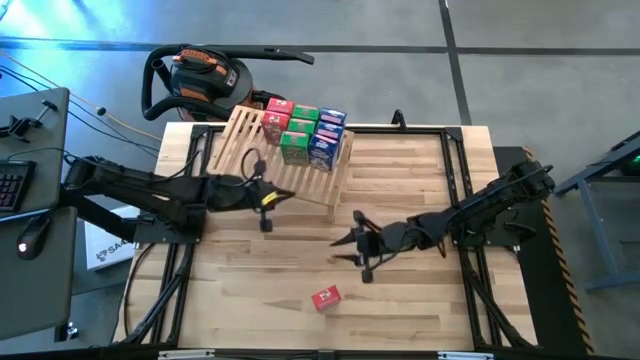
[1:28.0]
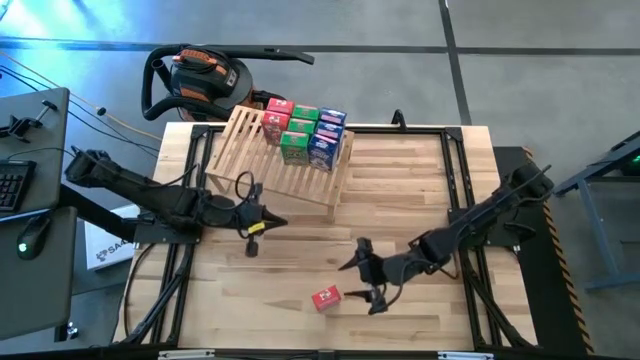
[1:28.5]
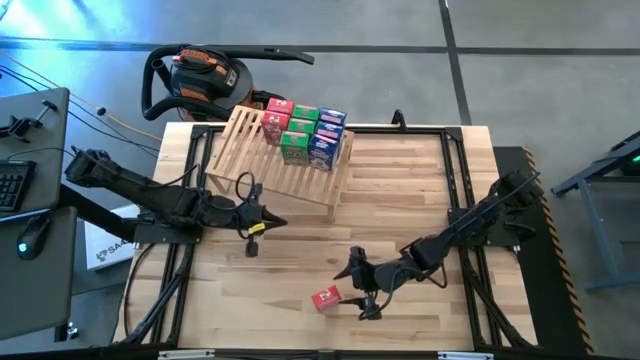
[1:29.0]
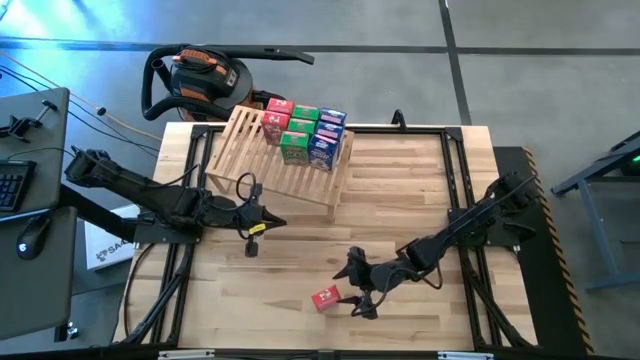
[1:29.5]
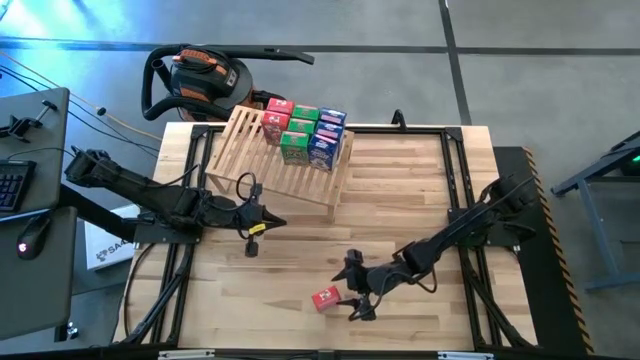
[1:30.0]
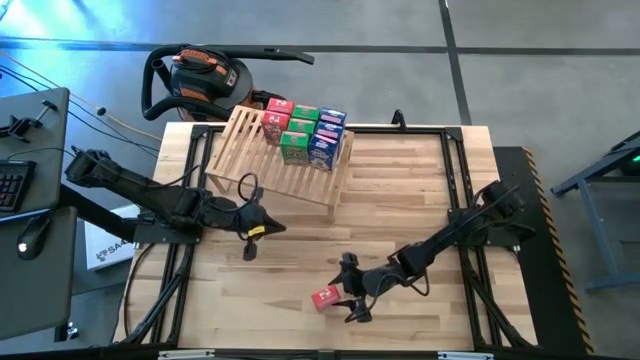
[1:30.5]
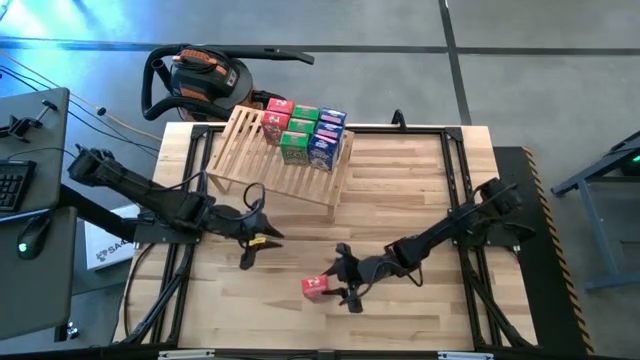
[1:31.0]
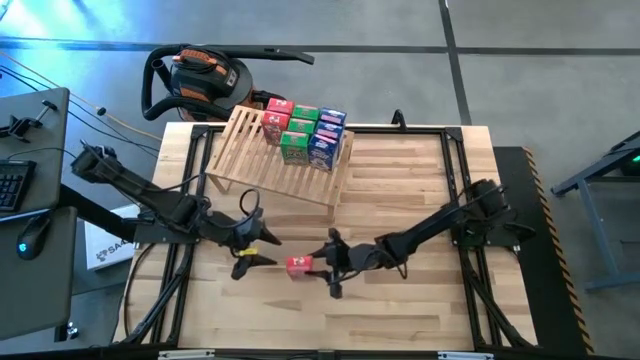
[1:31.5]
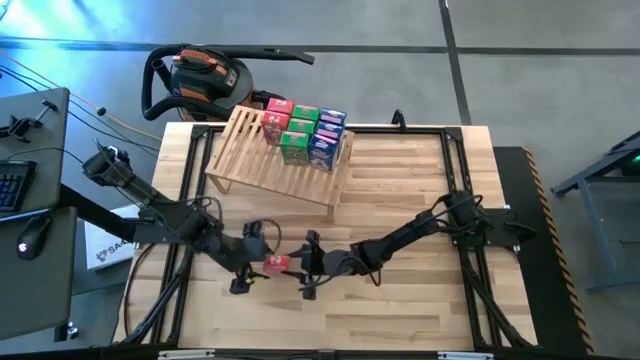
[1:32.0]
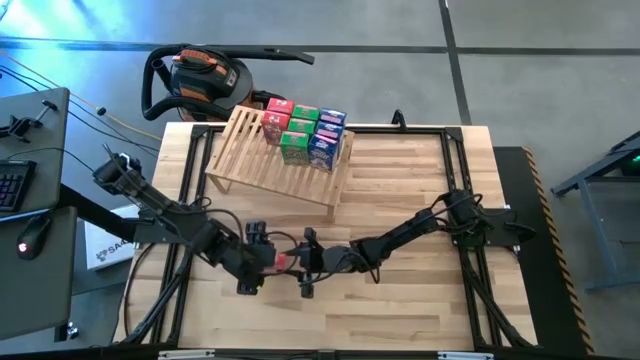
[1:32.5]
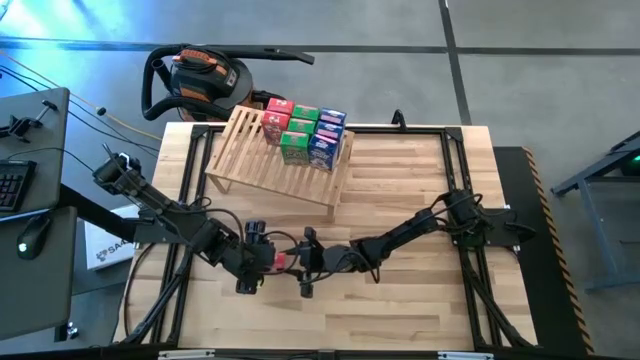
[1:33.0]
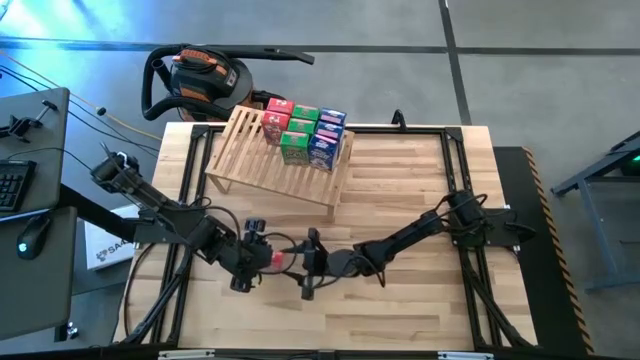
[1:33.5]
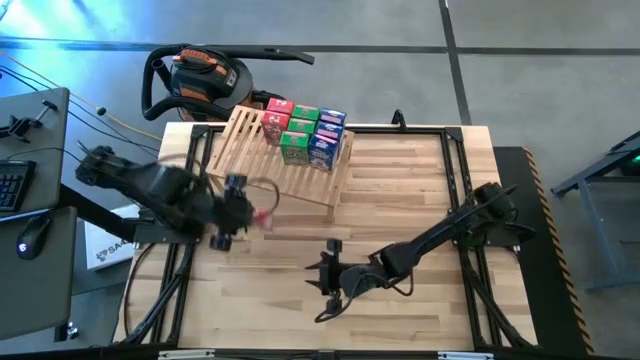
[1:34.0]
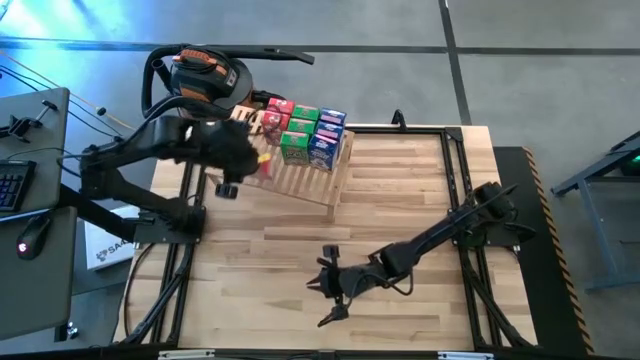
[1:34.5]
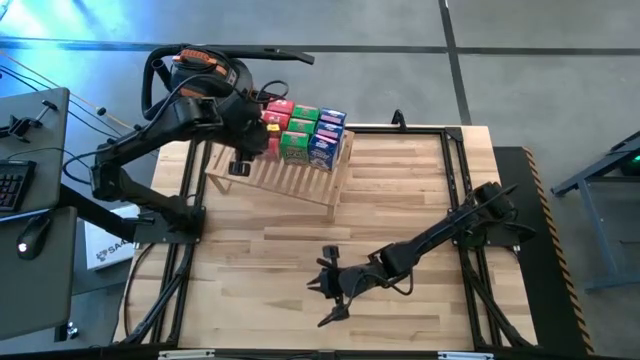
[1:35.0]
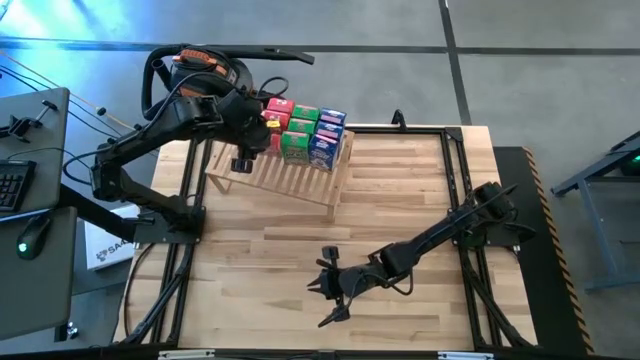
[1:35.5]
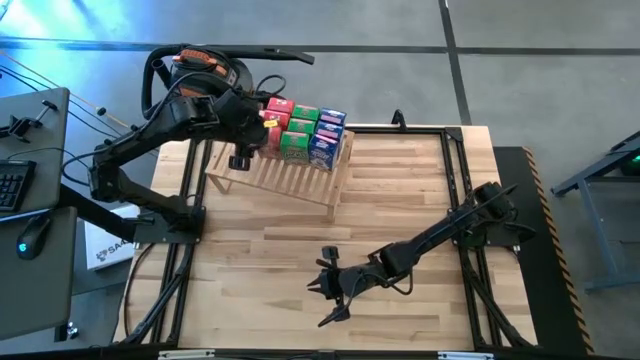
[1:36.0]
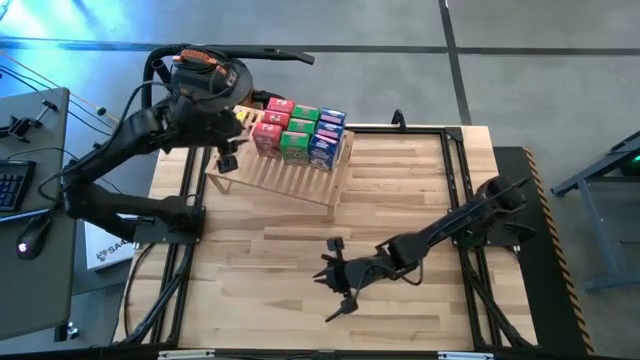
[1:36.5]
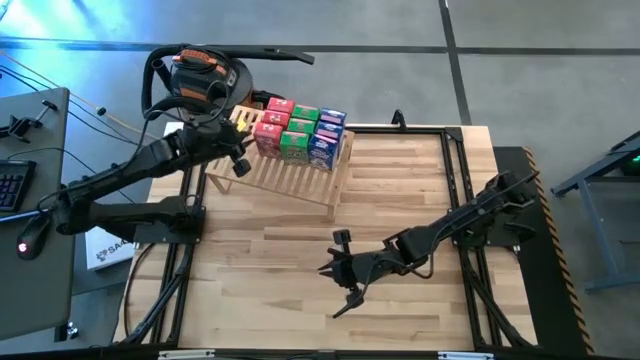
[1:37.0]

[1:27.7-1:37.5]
Task: Stack cereal on shelf
Put the red cereal box aligned with the other red cereal box on the shelf

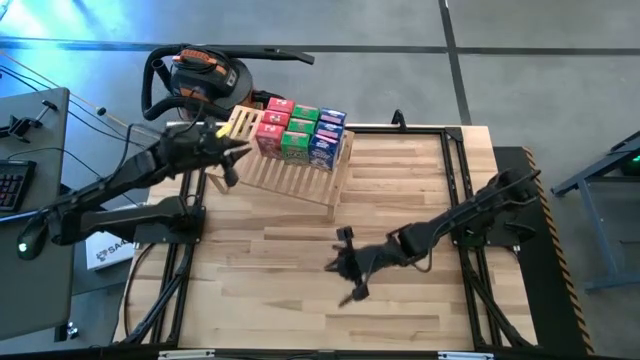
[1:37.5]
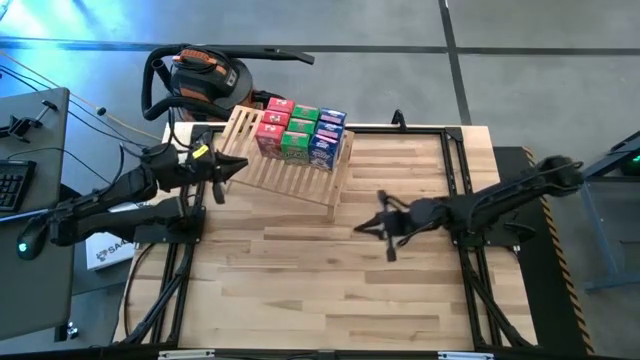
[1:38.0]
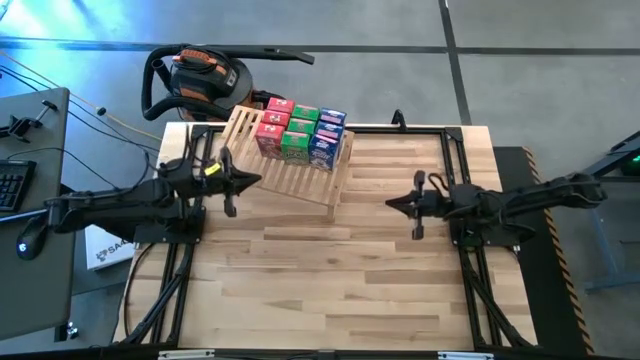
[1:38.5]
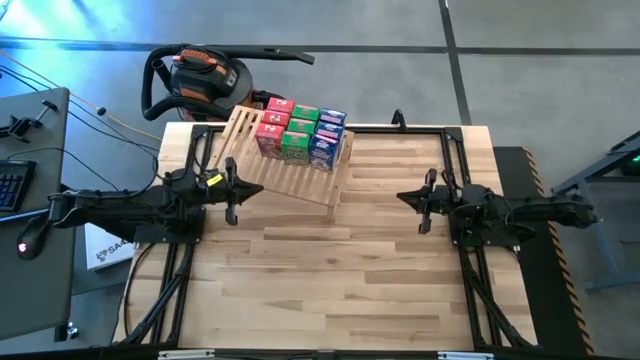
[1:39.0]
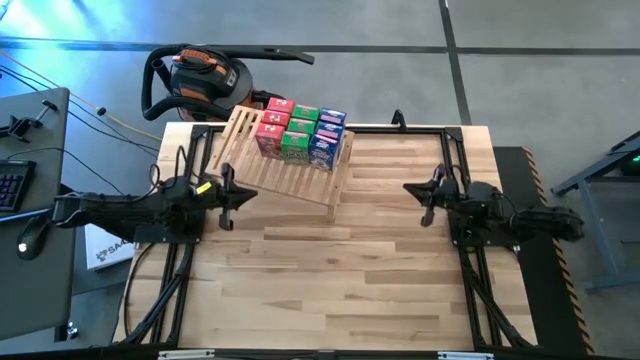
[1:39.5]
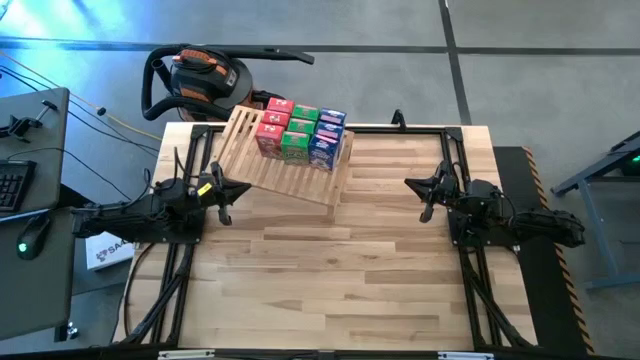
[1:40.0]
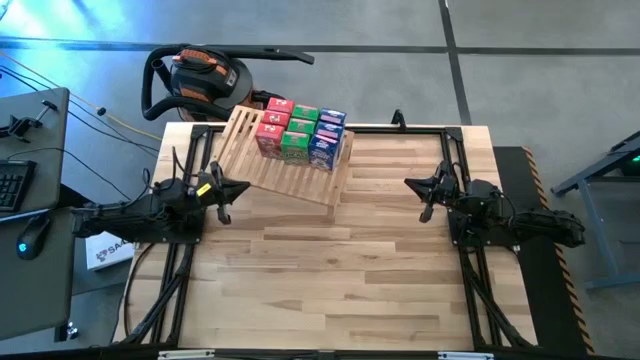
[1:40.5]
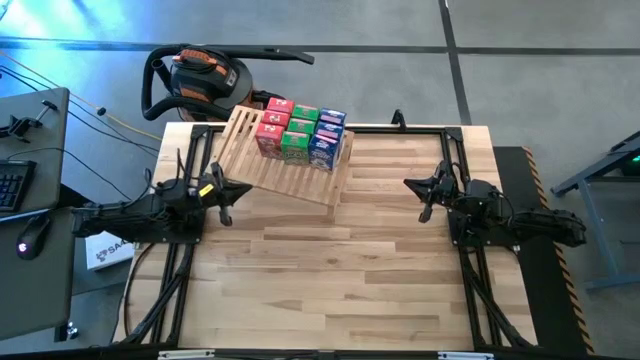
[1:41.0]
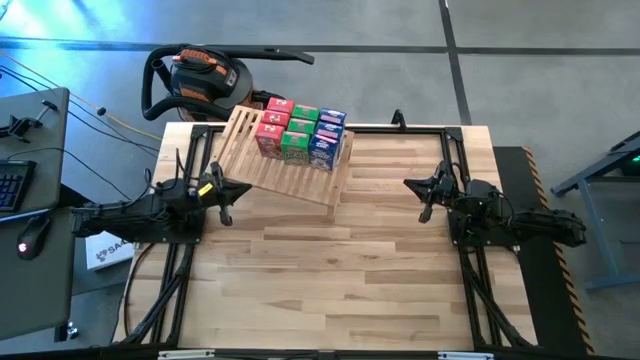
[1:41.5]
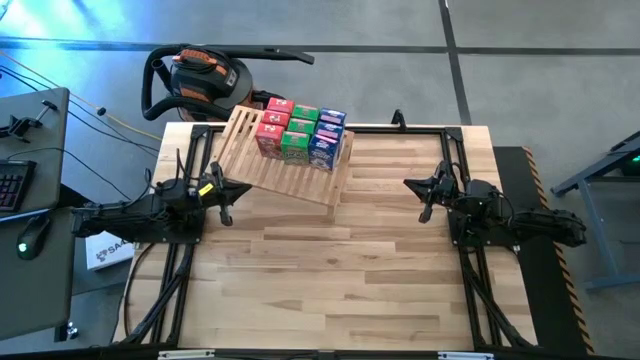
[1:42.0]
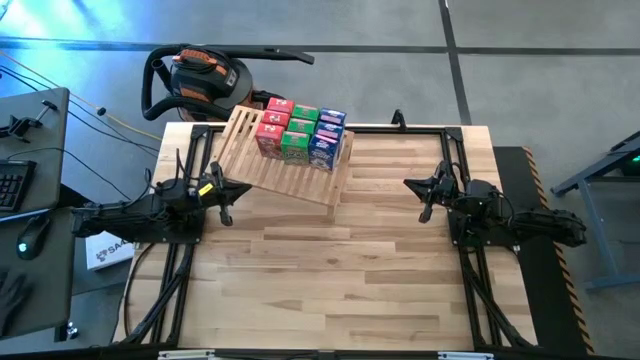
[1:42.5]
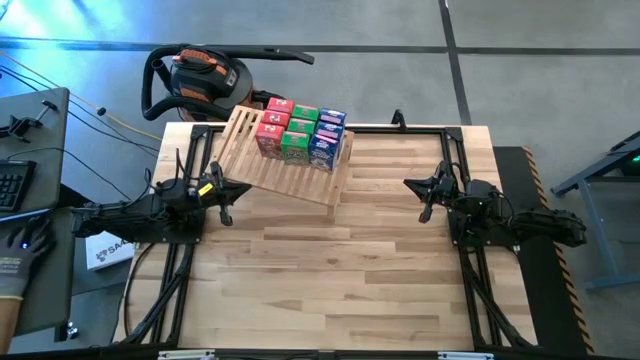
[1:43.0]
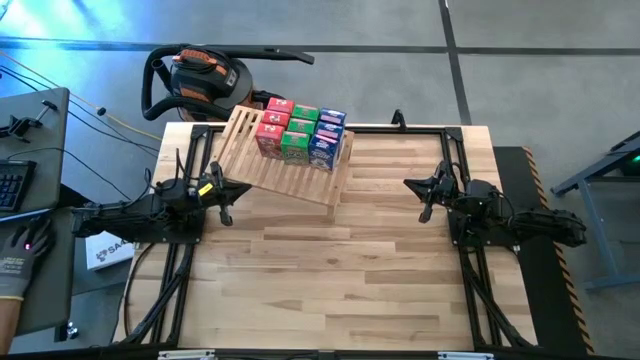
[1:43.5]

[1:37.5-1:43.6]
Return to Home Position

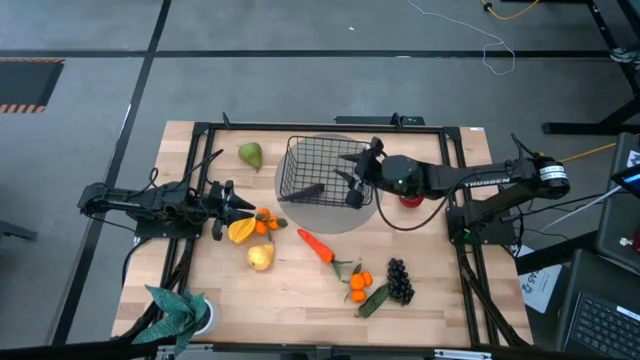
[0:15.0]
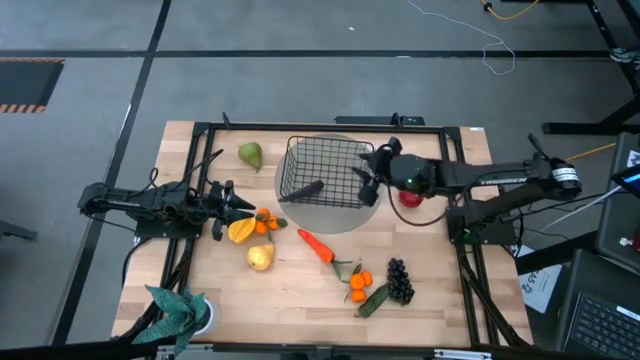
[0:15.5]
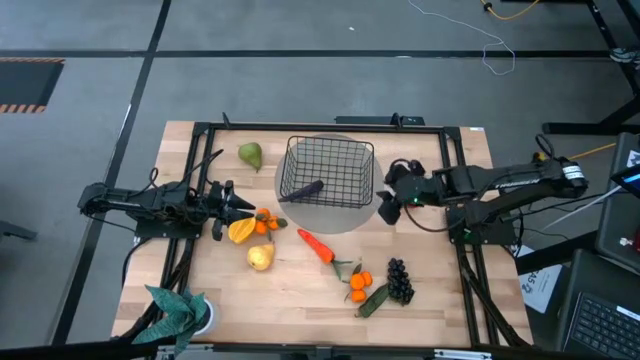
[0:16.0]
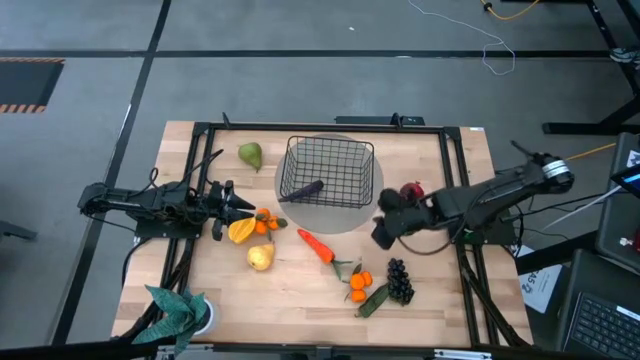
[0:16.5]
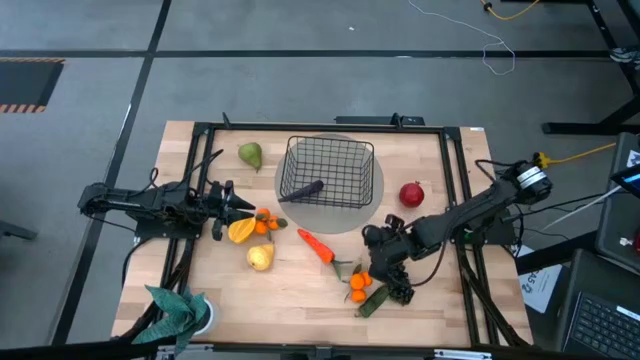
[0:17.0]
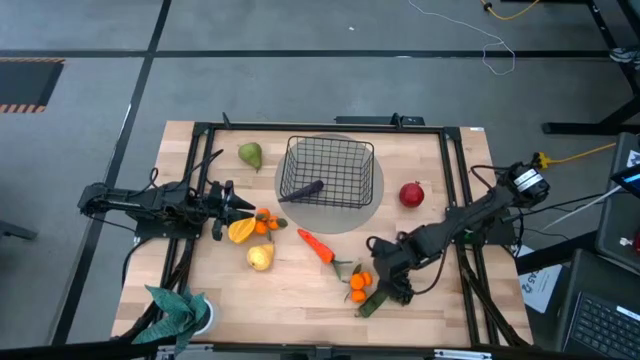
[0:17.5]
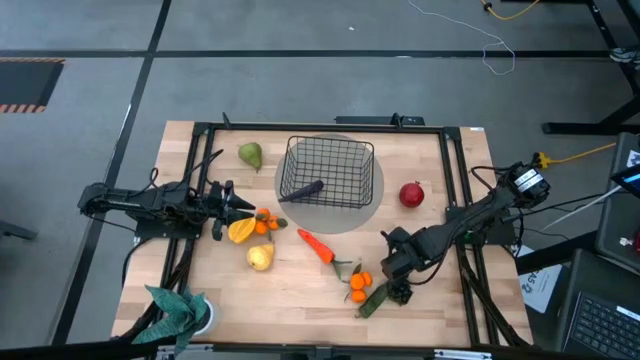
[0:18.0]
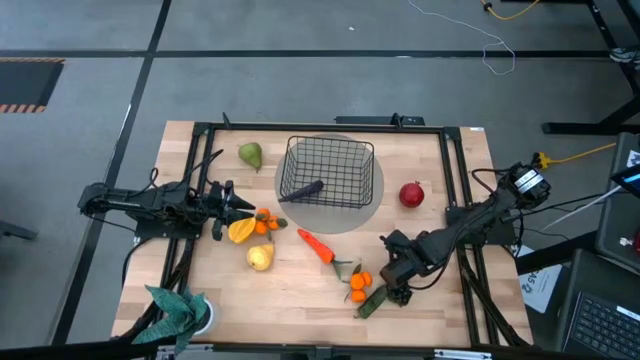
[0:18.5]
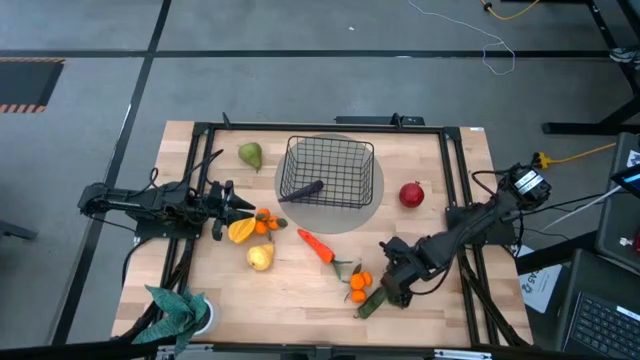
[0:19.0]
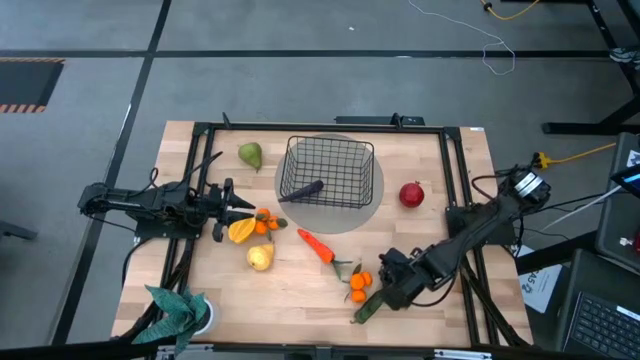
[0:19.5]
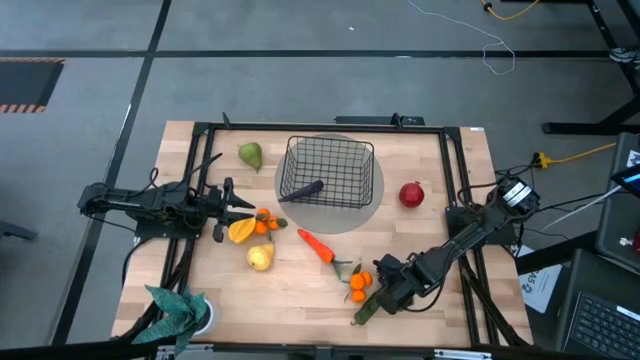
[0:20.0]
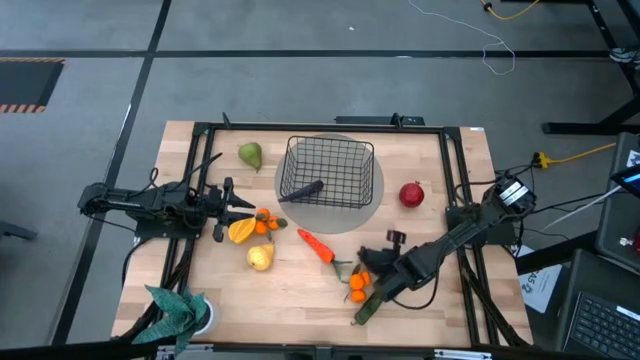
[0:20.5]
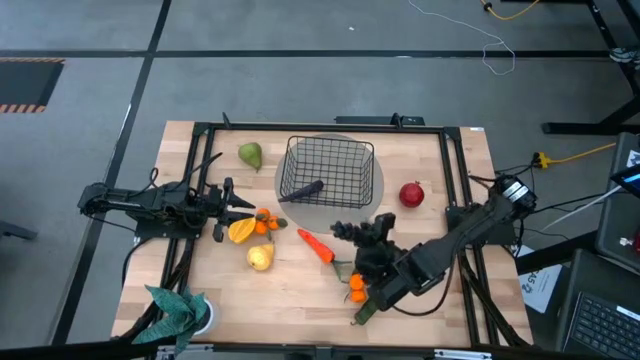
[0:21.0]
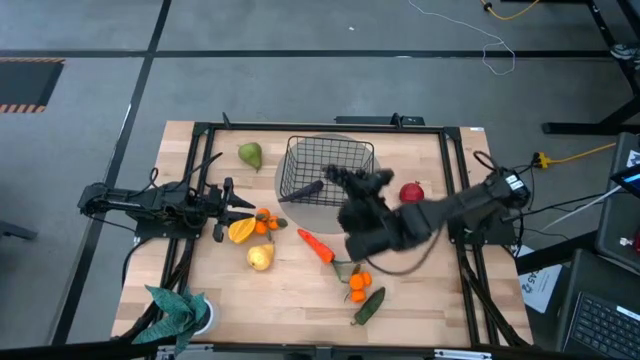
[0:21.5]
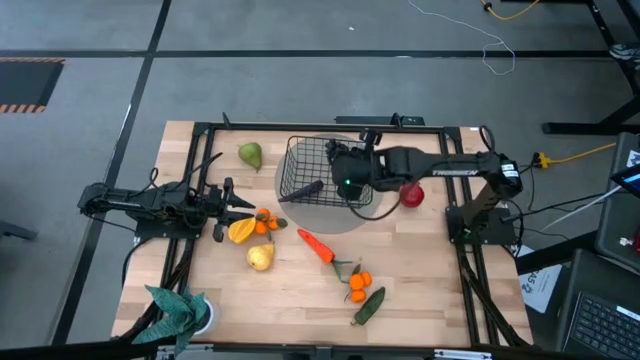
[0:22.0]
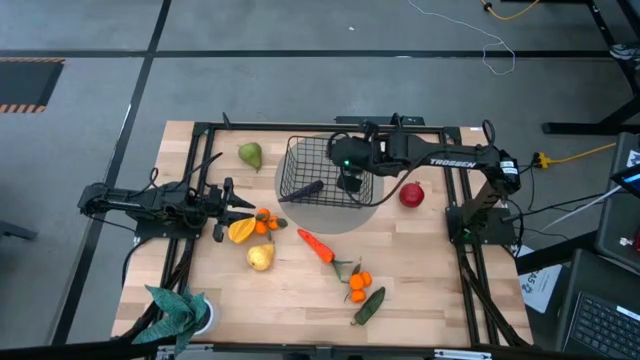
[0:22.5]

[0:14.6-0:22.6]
Task: Build produce basket
Put the black grapes into the black wire basket
